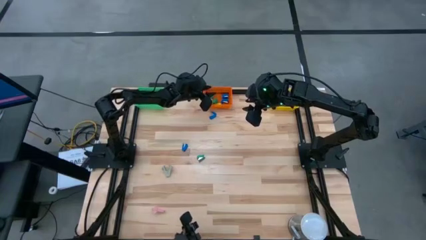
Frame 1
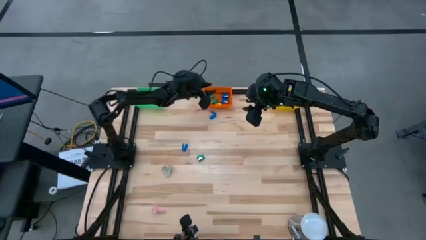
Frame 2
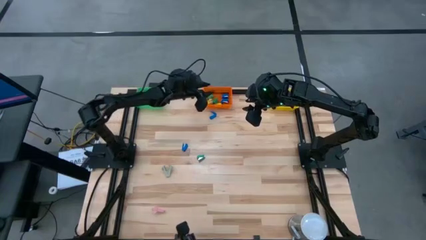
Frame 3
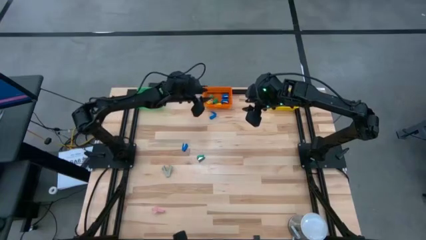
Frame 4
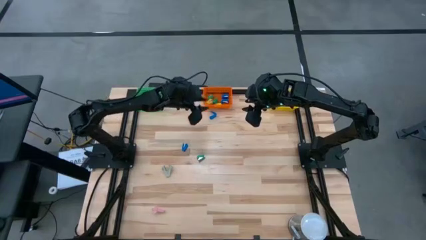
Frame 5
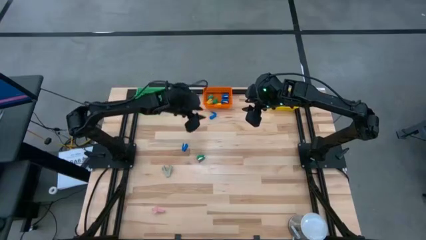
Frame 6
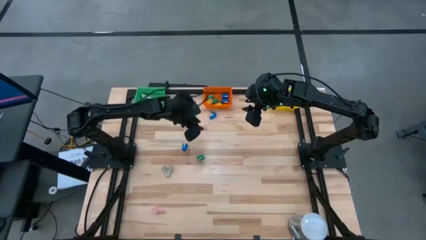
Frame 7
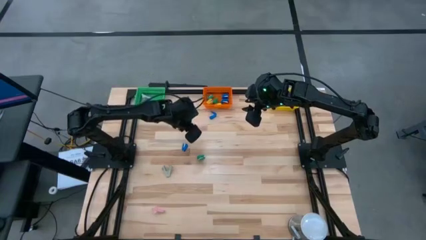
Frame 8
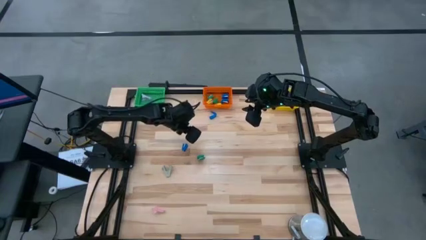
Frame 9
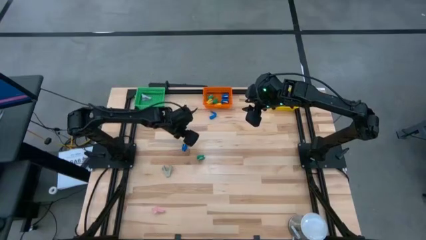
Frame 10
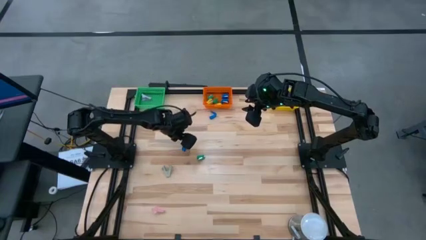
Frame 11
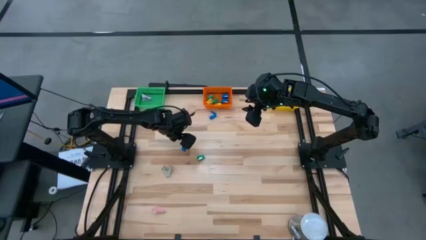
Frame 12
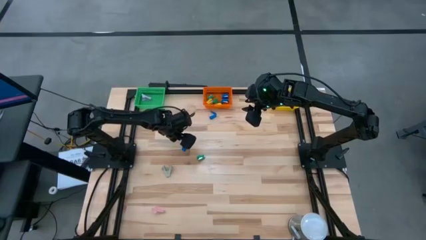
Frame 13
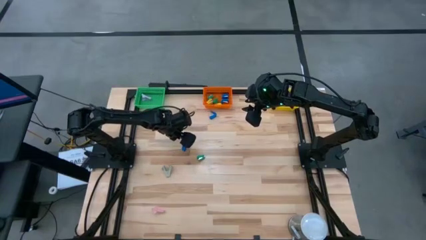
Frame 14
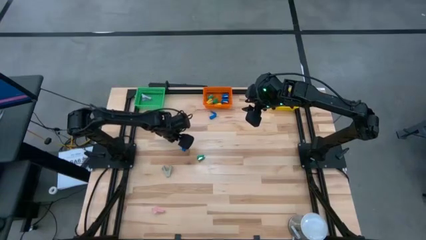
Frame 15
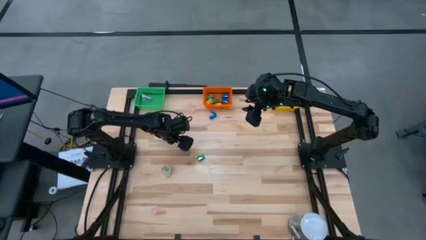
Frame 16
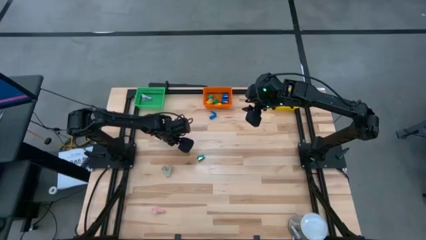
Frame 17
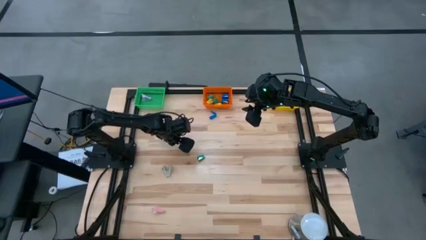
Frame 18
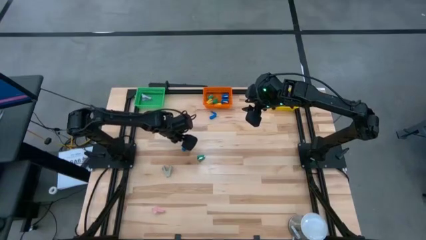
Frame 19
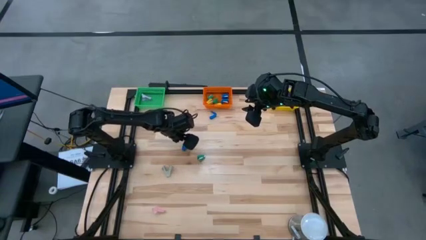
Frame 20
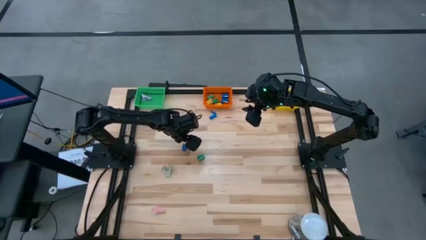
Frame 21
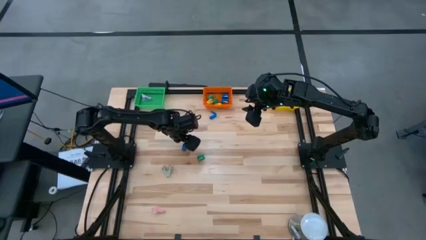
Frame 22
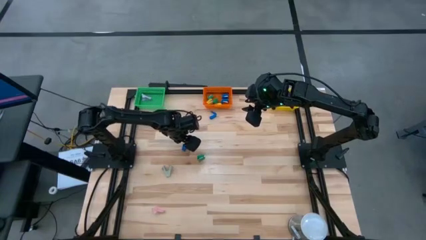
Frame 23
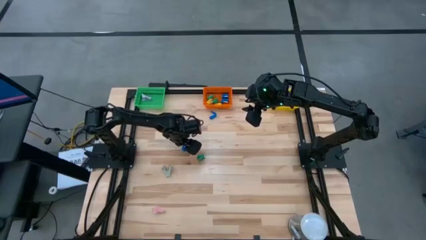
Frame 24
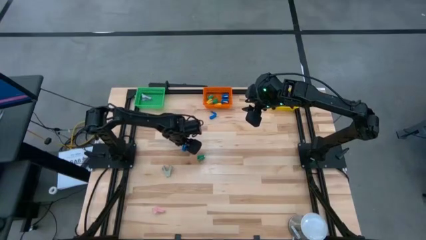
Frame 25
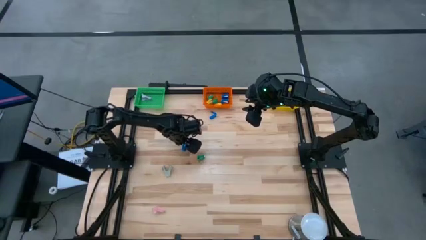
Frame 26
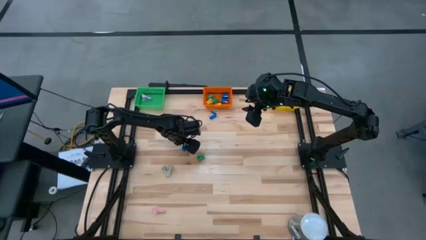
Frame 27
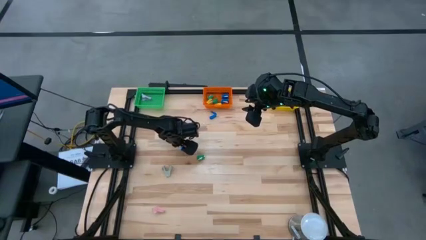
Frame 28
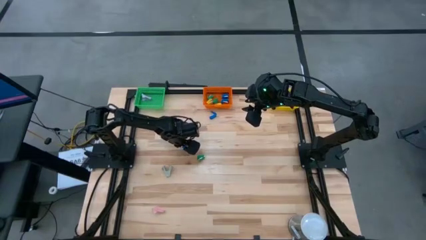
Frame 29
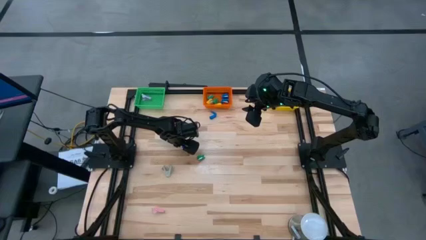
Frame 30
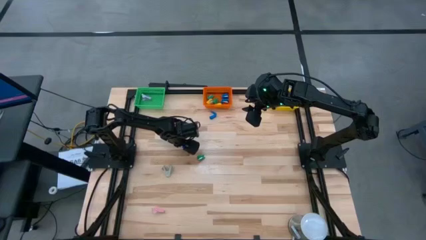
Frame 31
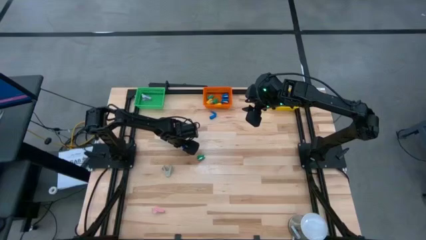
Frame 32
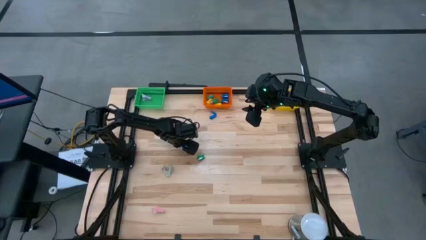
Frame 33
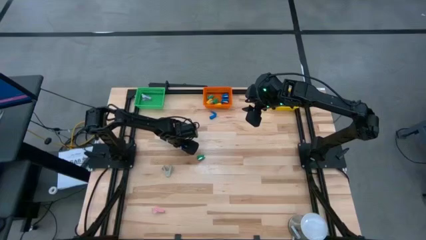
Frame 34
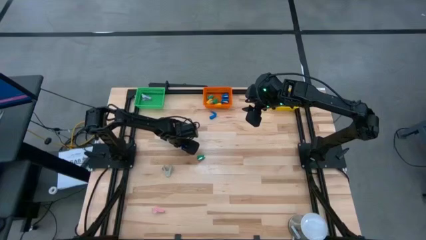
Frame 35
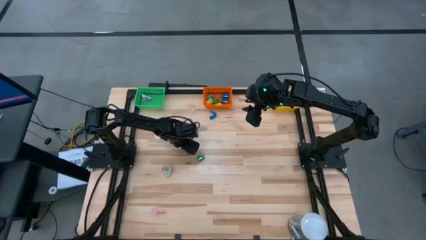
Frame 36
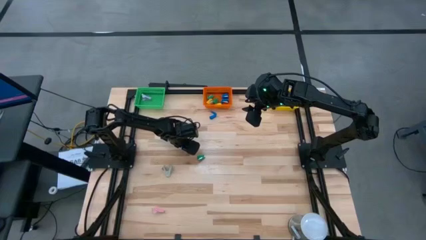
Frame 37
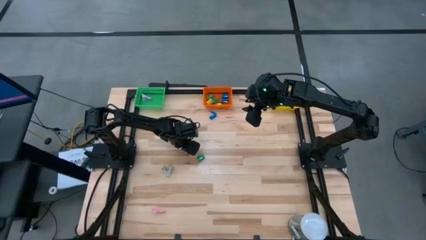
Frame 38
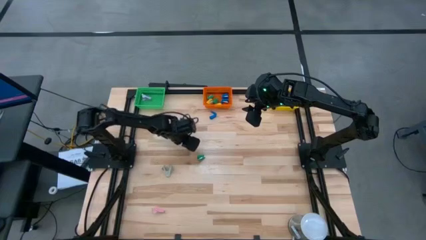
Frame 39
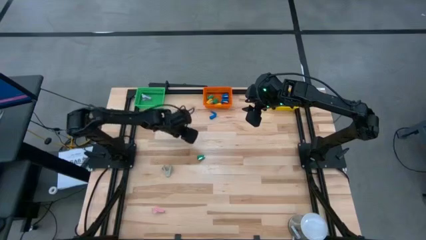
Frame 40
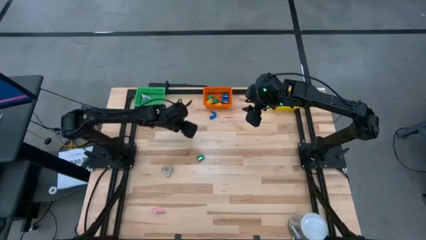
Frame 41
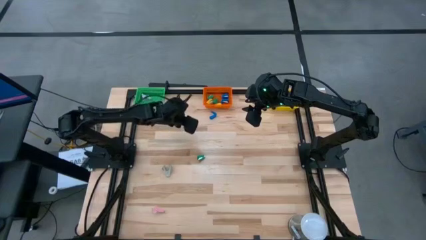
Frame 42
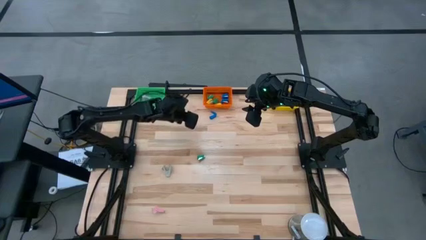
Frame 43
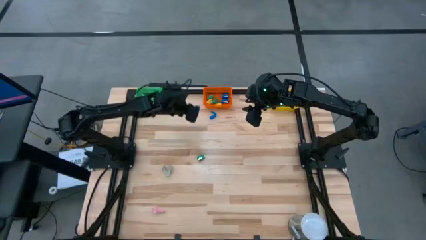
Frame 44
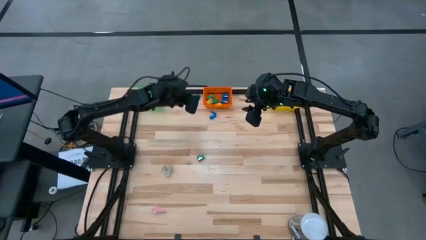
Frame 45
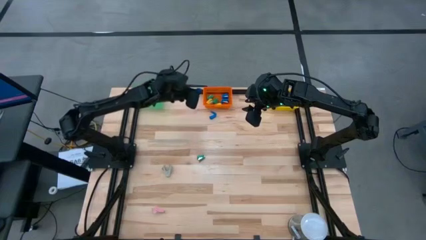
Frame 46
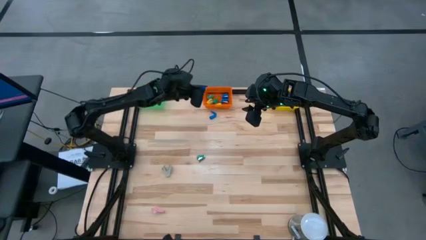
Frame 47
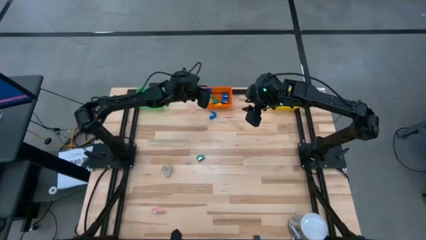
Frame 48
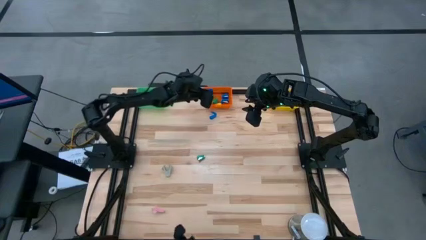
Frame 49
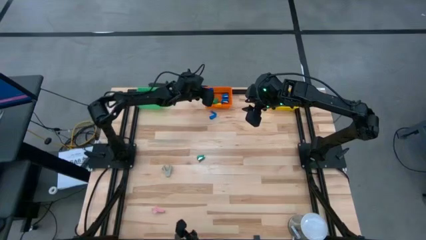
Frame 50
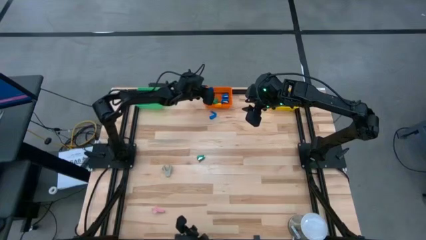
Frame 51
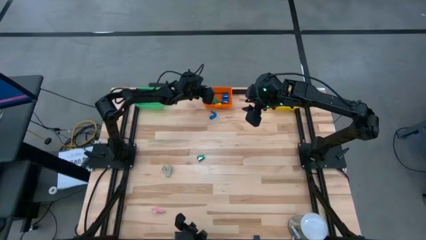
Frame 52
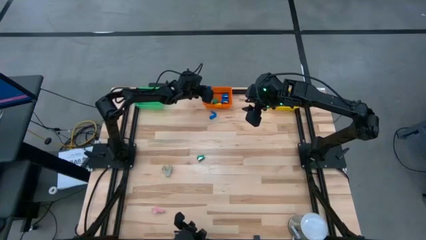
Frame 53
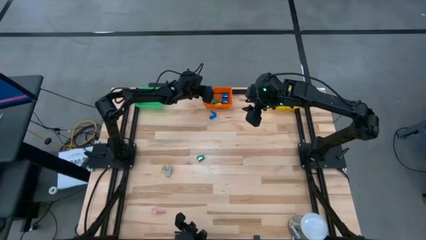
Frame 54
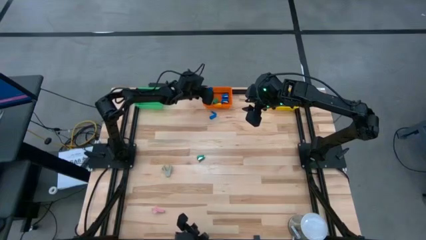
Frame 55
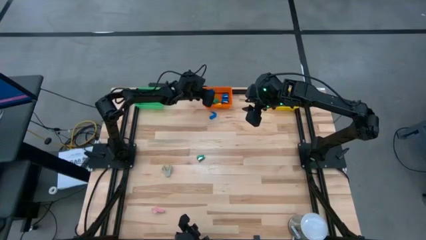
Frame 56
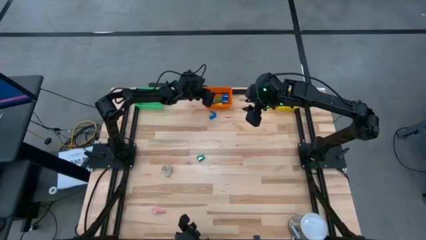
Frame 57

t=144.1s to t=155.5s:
Task: Pick and place Stapler, Stapler remover, tape
Put the blue stapler into the orange bin

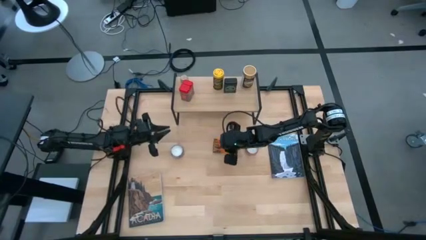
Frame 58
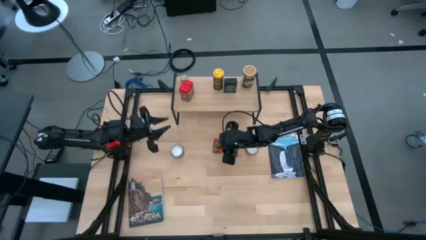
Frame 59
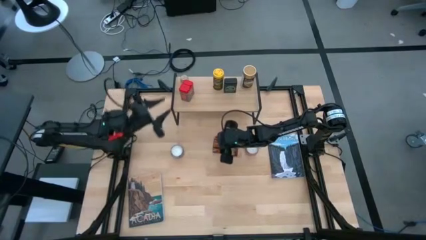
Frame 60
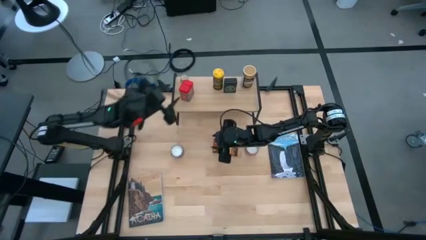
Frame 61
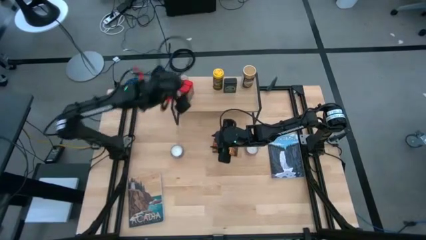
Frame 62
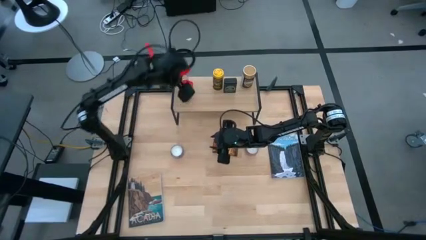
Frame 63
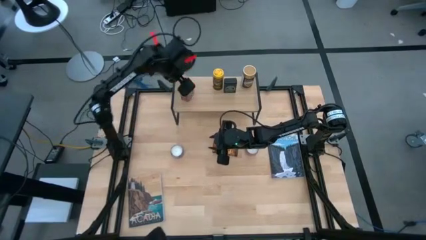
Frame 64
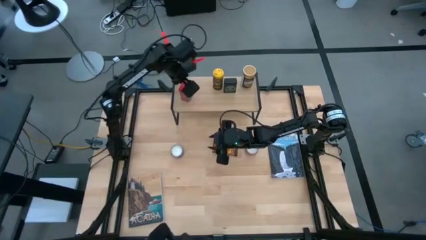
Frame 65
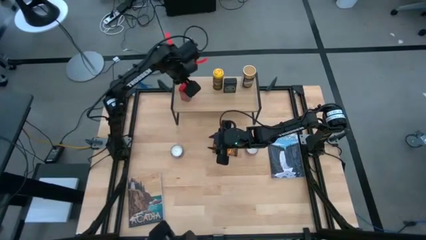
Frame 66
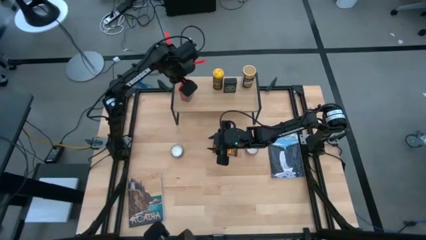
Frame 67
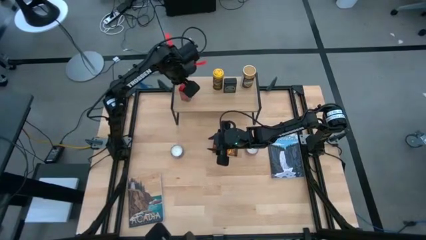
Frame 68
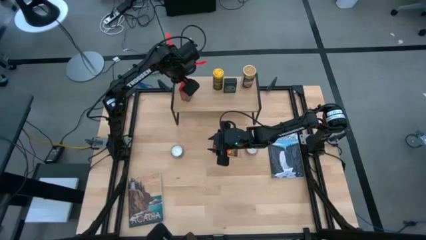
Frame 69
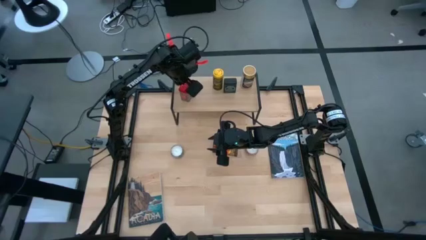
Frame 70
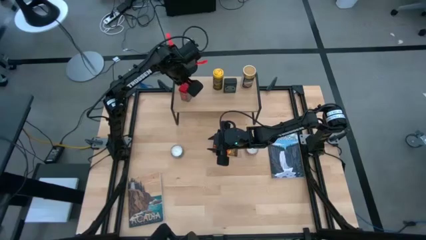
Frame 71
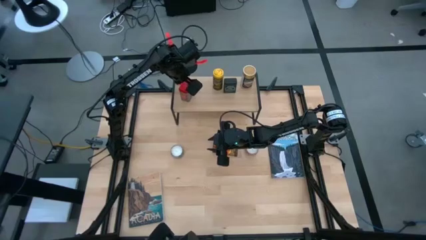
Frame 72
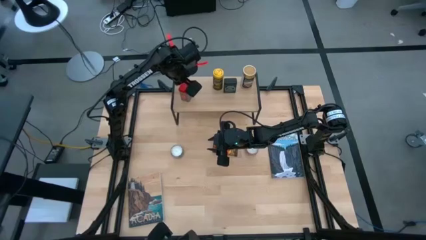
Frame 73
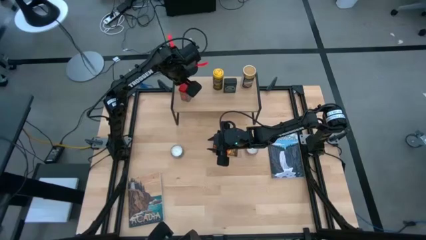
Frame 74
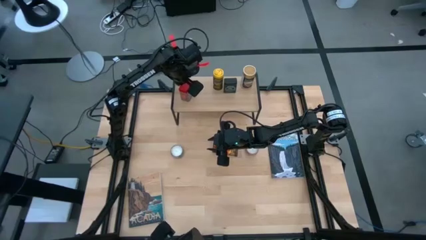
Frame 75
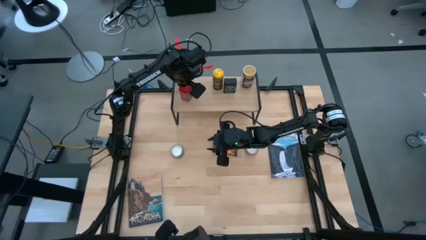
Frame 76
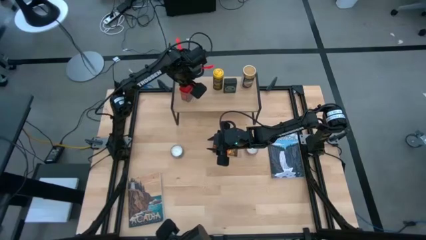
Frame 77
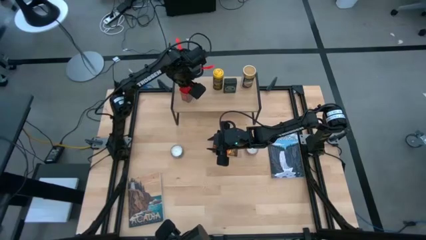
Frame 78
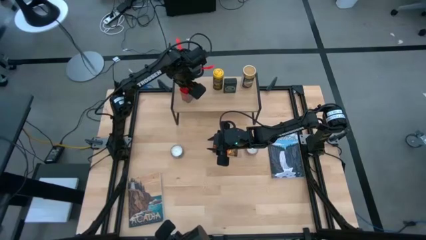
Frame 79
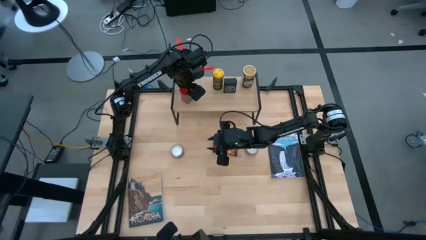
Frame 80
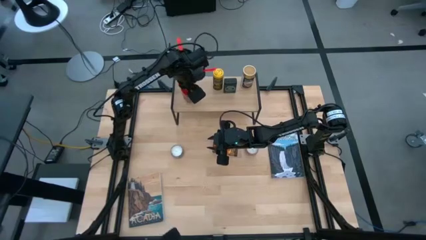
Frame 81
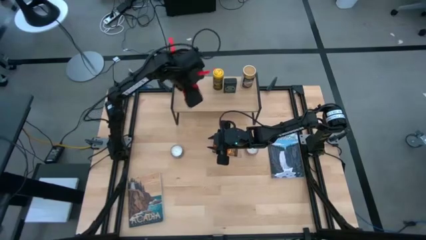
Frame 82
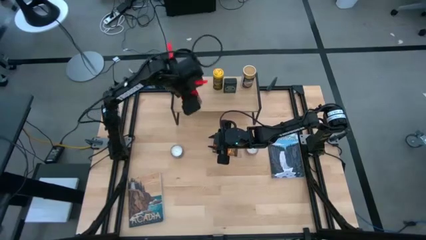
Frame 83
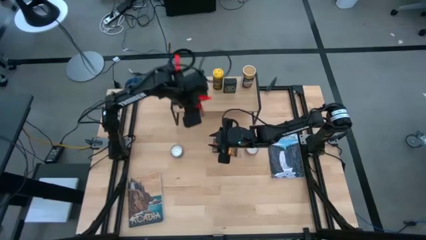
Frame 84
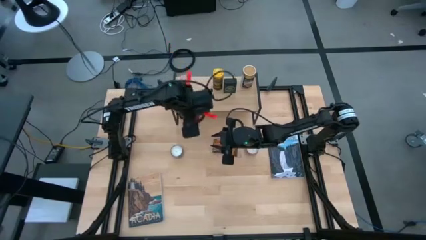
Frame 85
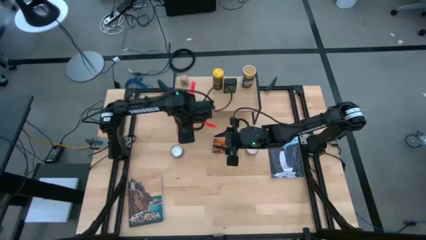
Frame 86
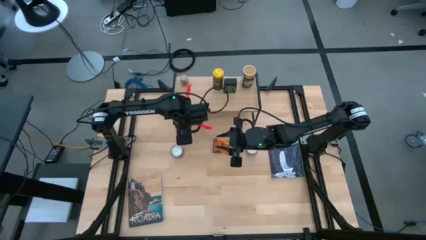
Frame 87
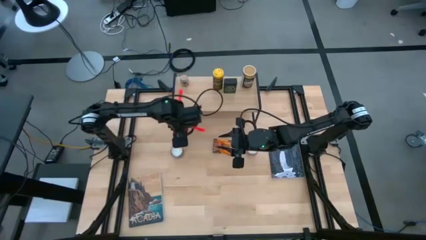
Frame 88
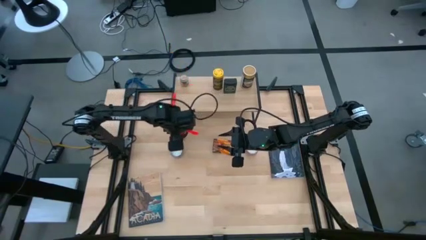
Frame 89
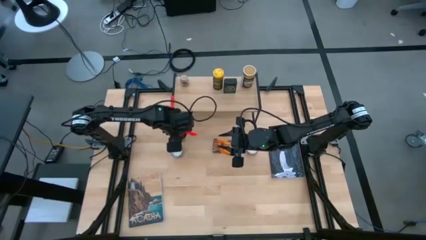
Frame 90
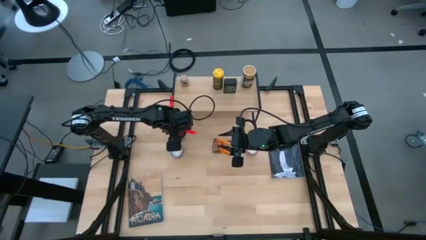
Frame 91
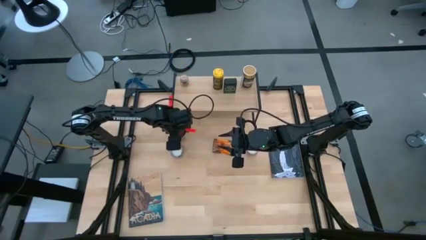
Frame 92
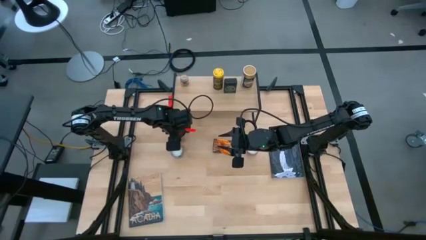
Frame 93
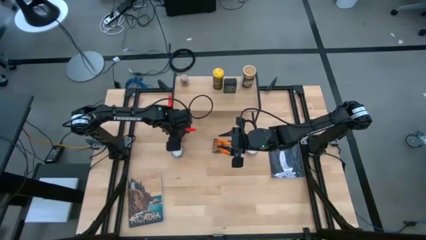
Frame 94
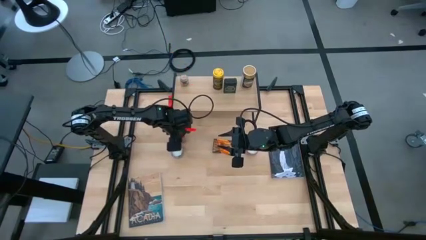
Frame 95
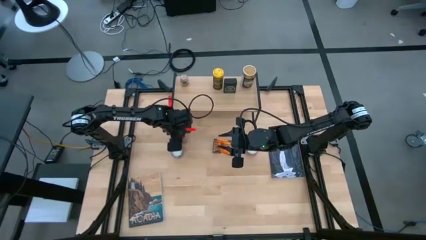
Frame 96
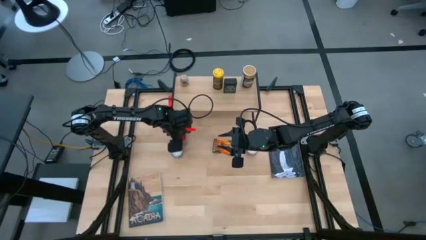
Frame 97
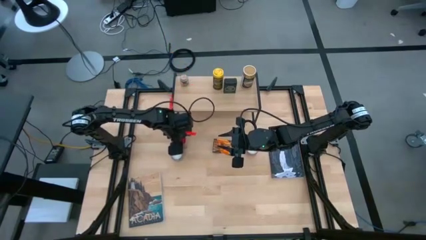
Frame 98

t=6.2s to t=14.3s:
Task: Shelf spices
Remove the red seasoning can from the shelf
